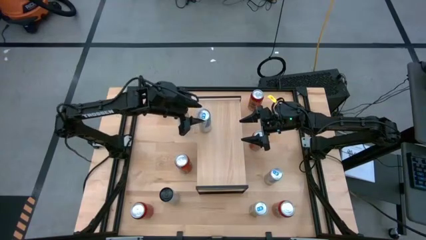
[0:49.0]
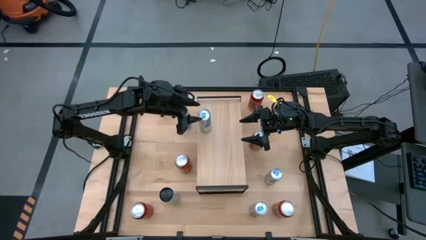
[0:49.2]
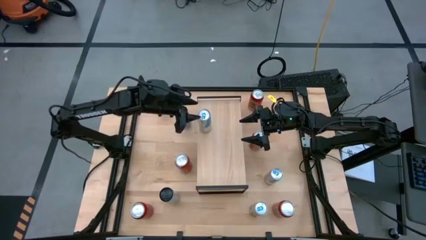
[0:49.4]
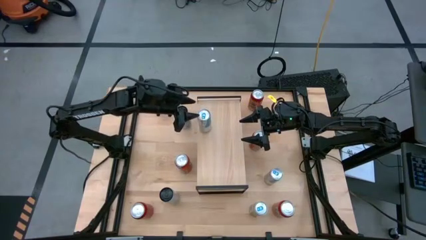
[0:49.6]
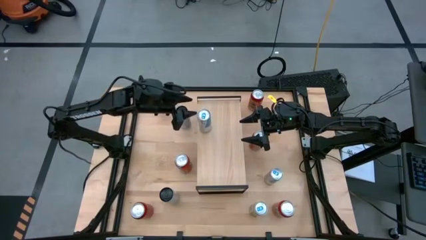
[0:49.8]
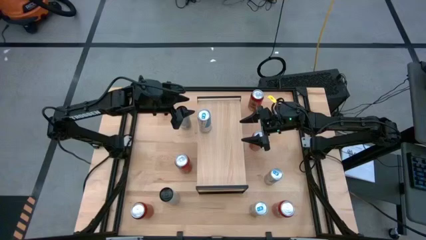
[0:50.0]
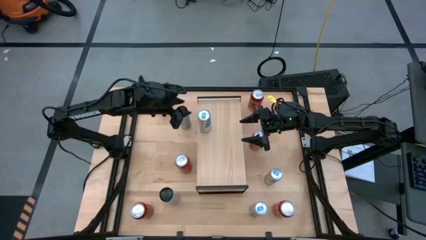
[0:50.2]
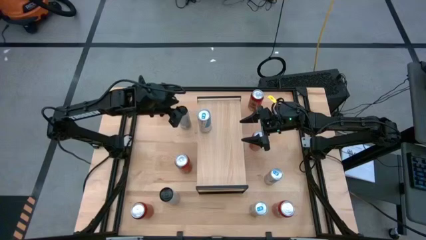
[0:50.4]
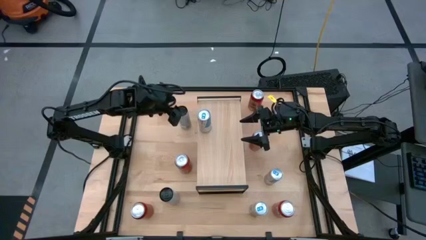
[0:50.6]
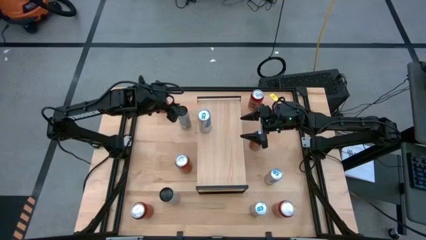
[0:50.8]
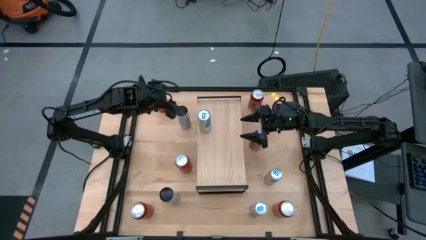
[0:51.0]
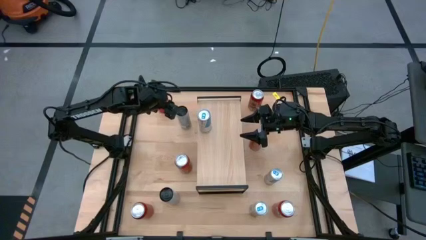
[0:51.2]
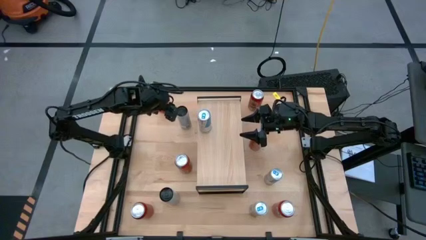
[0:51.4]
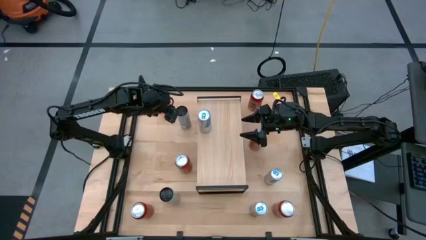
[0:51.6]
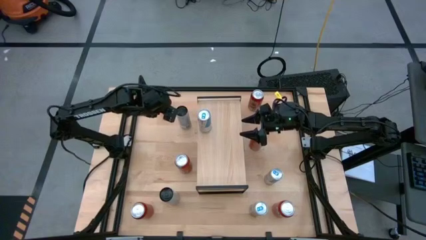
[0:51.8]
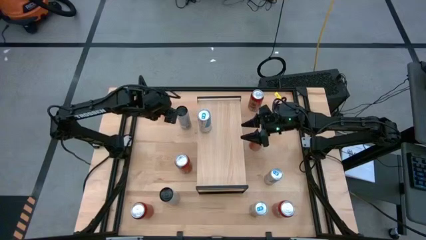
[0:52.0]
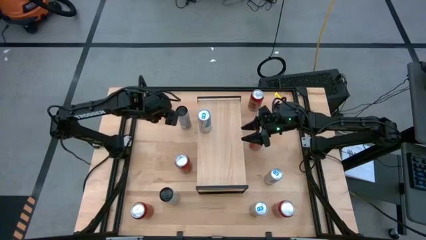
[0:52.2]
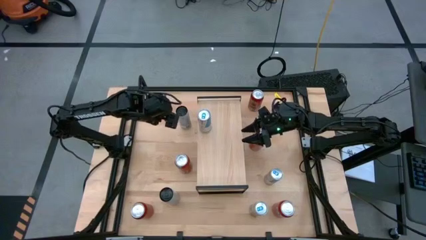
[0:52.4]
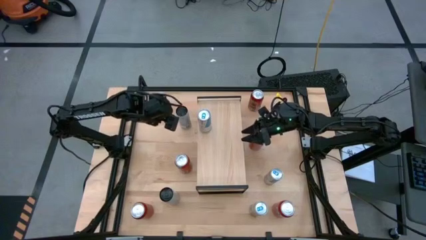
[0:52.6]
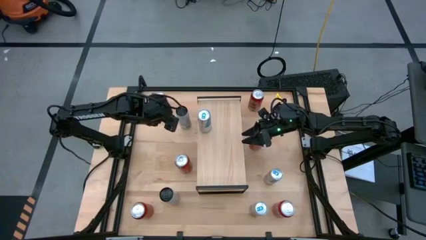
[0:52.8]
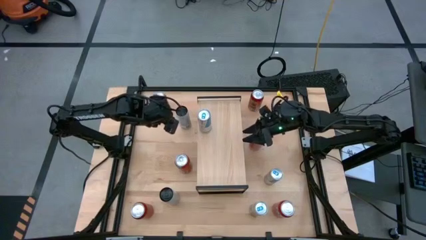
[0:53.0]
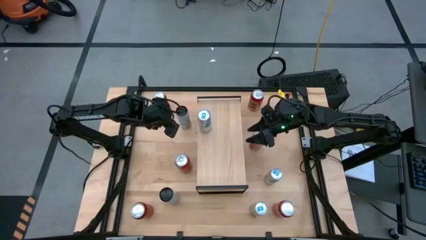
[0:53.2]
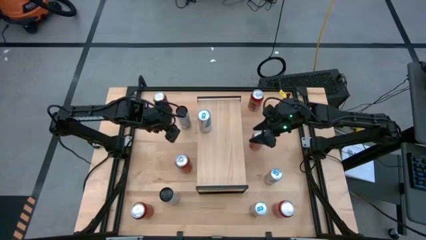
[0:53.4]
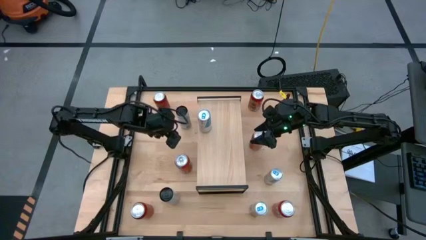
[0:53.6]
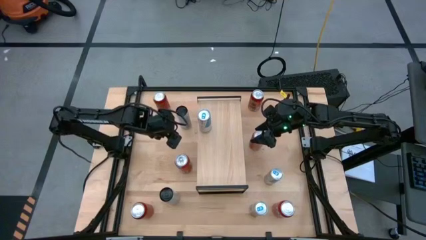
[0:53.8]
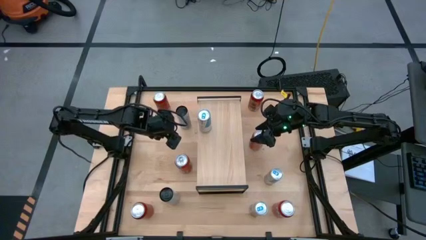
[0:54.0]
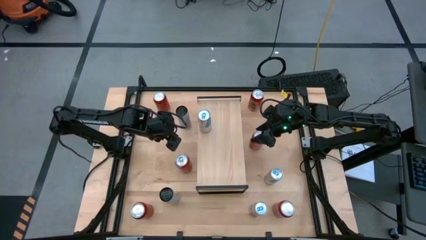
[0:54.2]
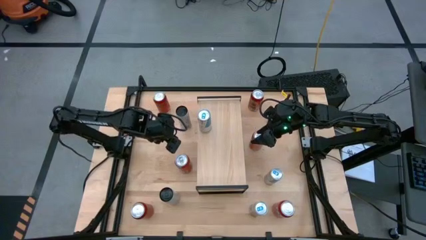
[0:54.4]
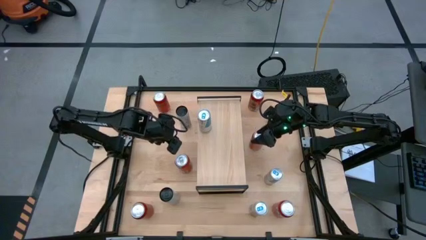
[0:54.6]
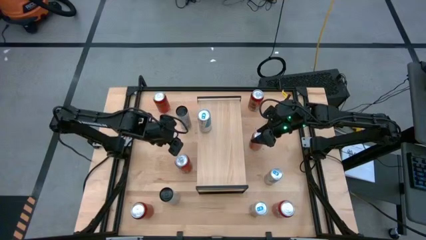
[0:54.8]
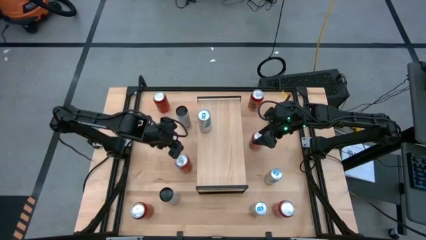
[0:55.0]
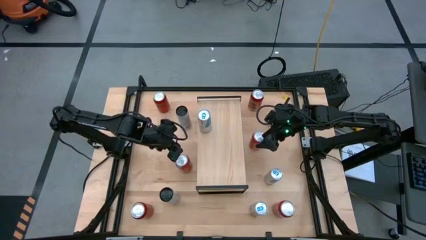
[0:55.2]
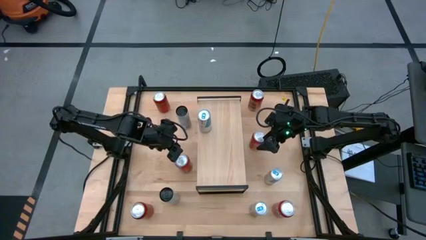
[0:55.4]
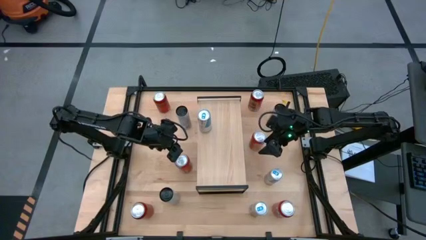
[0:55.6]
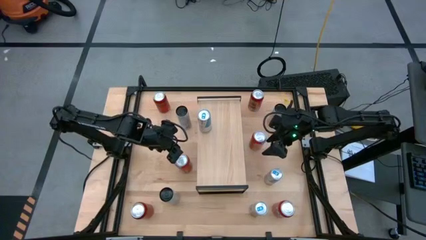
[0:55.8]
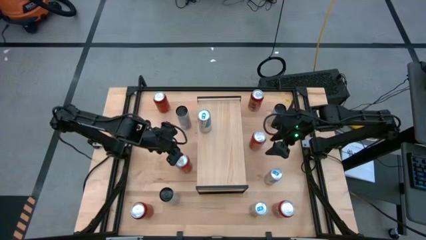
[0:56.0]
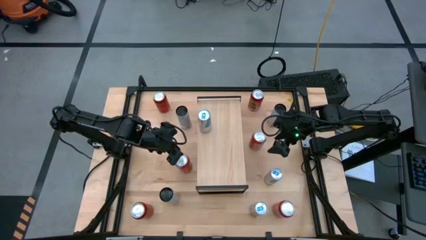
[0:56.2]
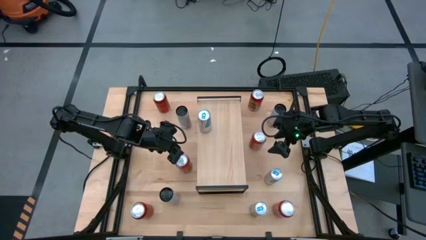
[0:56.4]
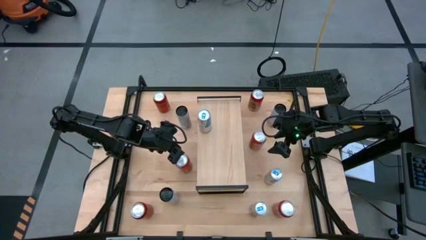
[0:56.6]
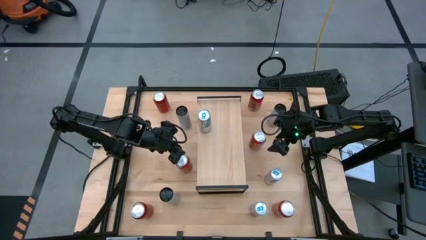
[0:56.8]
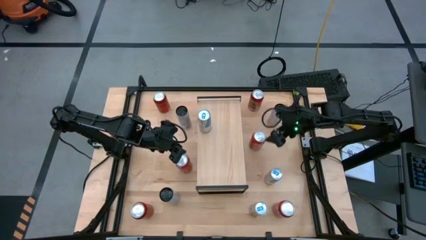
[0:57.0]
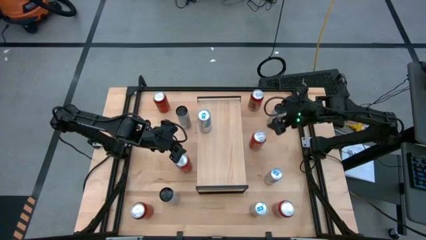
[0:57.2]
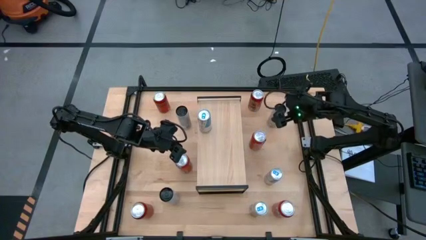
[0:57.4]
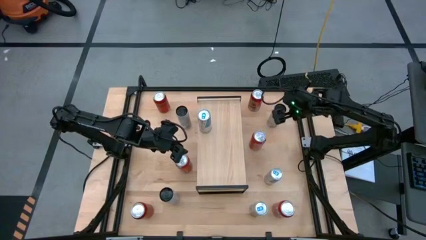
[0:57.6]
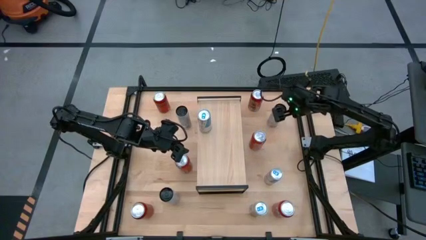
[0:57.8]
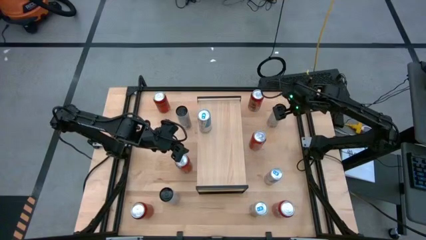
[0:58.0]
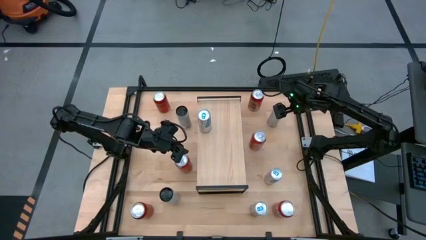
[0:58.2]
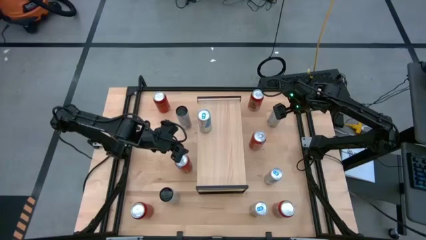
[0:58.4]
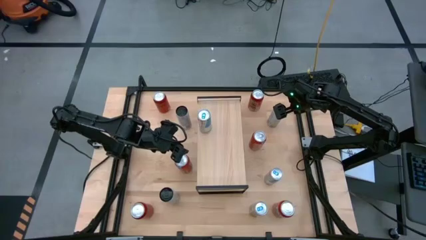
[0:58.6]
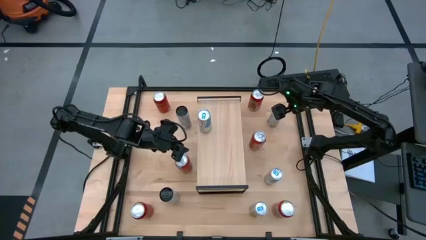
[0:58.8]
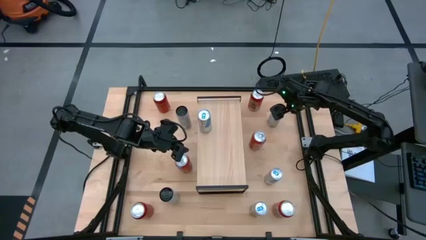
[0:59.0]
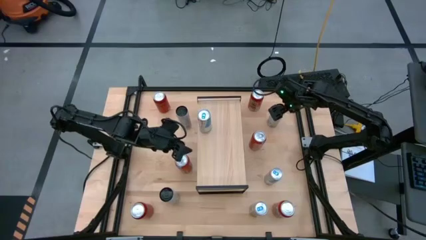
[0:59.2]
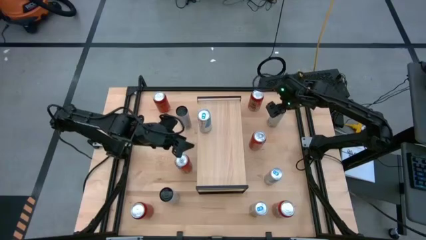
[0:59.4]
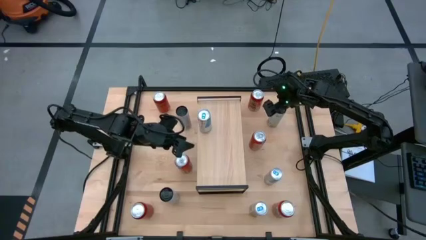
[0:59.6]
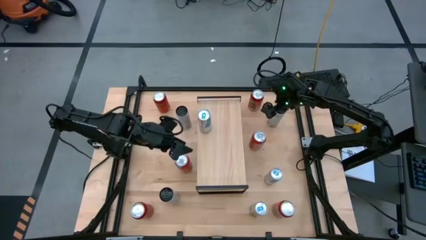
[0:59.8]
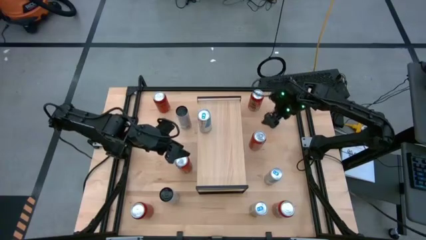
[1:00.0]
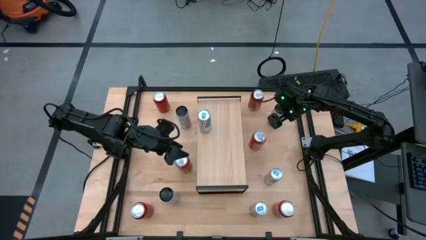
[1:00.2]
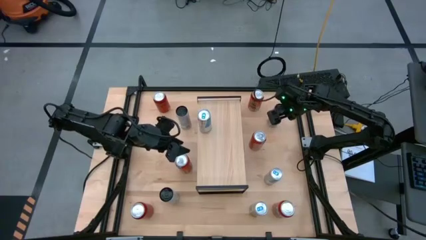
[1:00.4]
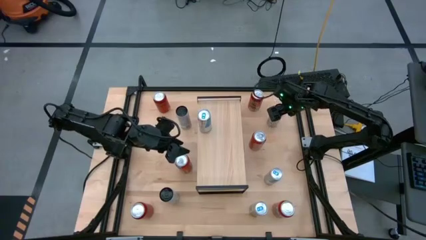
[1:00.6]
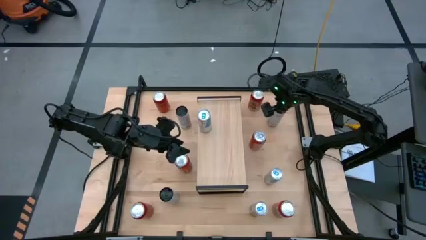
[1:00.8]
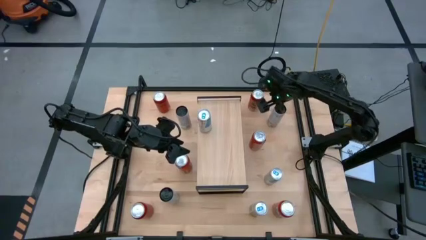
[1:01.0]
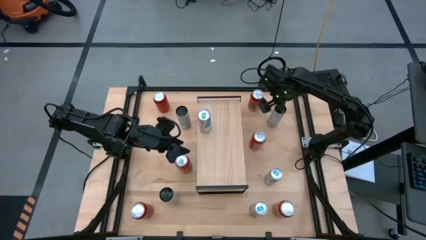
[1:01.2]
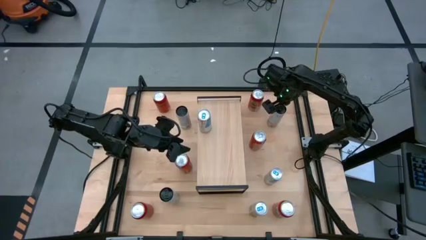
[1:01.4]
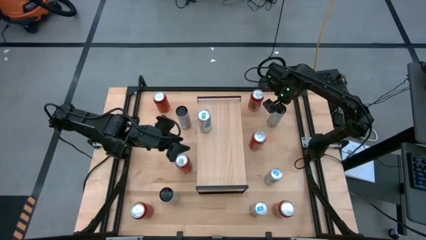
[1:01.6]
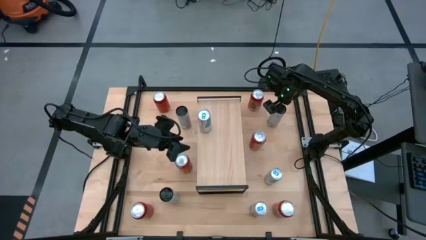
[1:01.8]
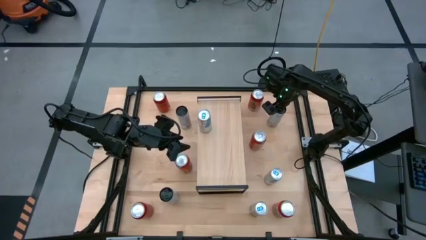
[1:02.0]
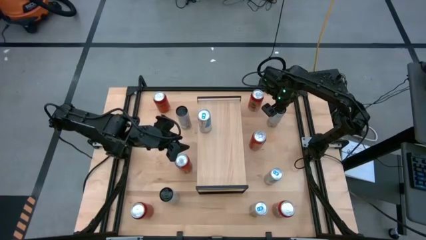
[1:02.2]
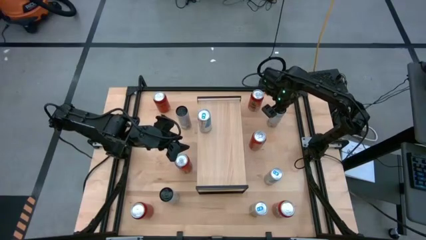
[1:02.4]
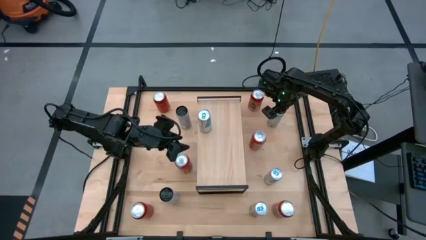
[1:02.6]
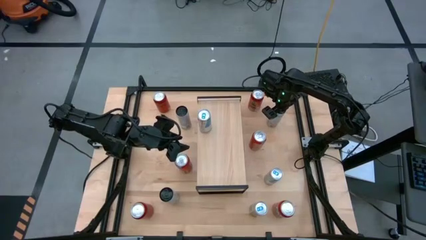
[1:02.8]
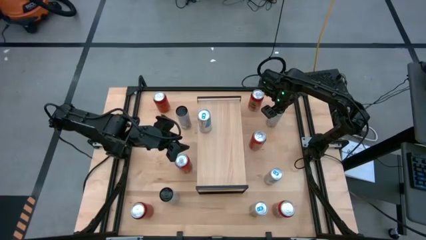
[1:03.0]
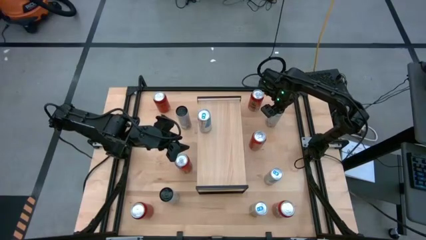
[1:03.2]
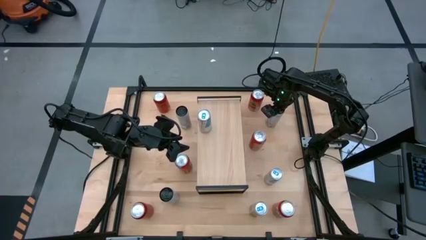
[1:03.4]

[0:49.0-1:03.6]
Task: Place canned beverage on shelf
Put the top right white and yellow soda can on the shelf
